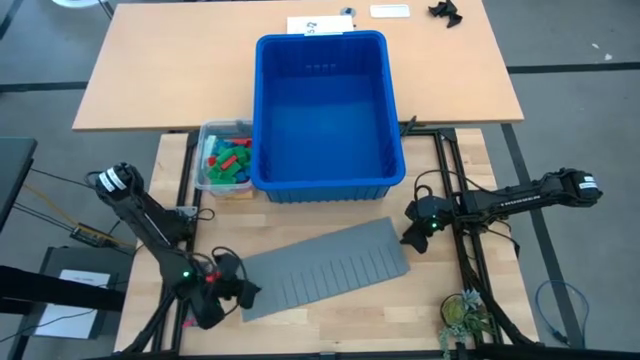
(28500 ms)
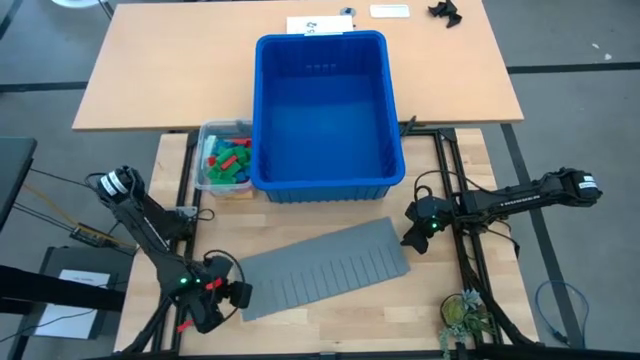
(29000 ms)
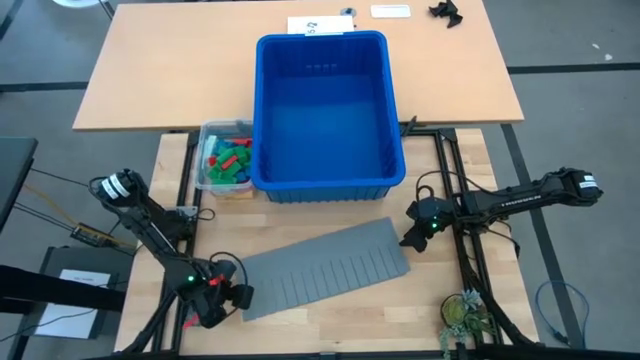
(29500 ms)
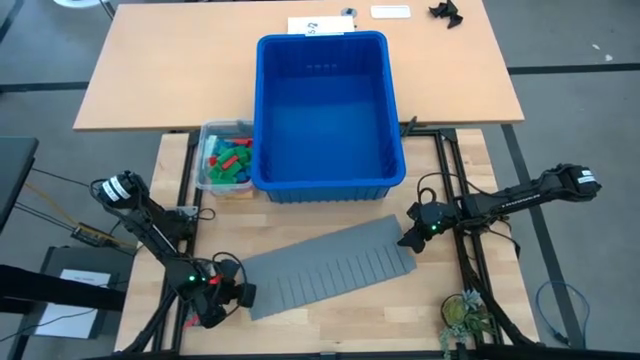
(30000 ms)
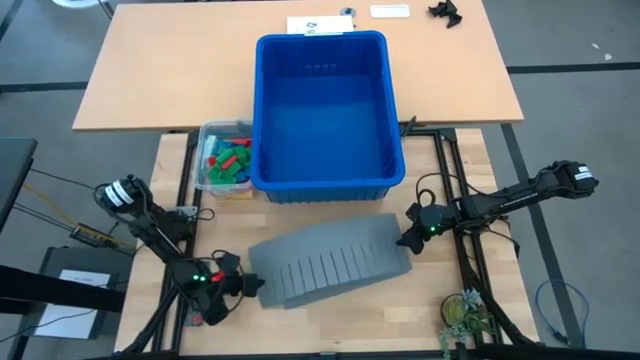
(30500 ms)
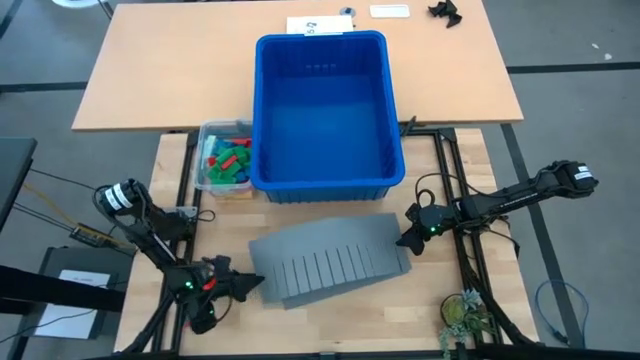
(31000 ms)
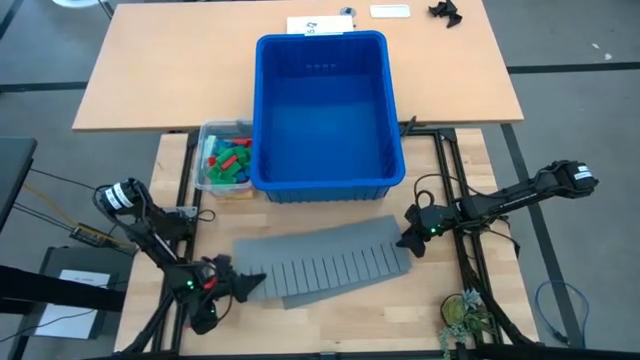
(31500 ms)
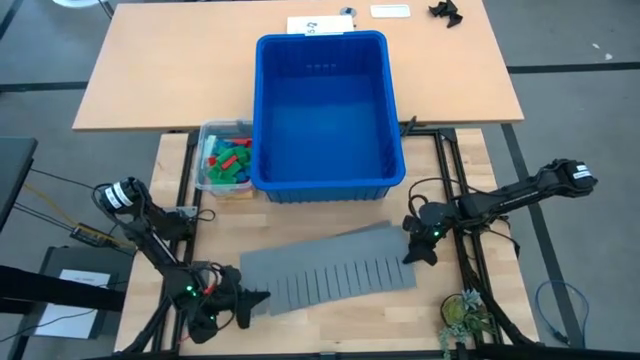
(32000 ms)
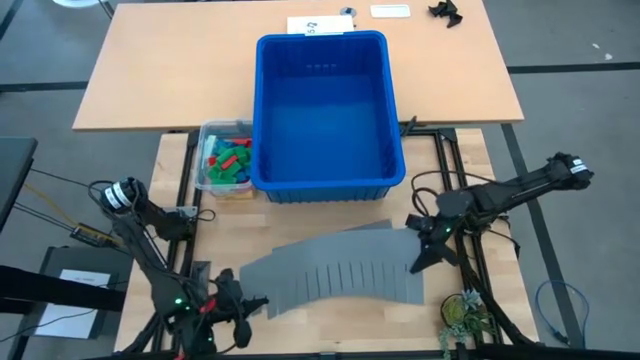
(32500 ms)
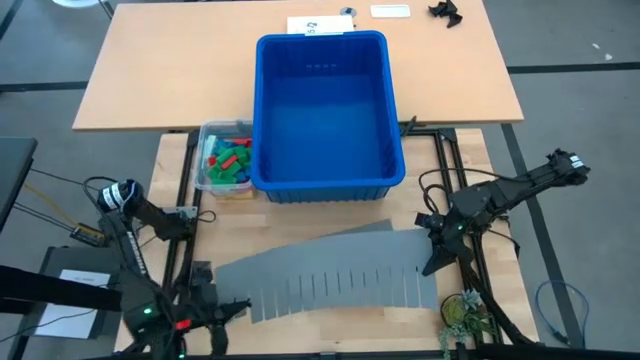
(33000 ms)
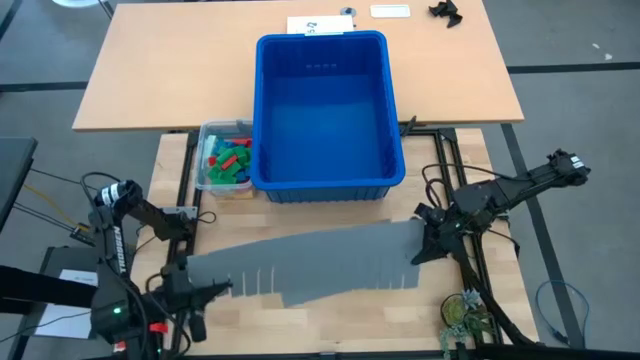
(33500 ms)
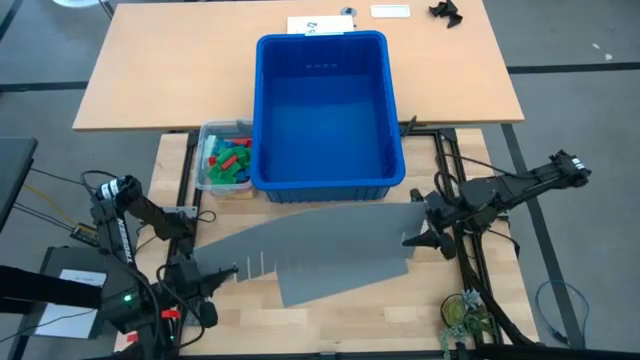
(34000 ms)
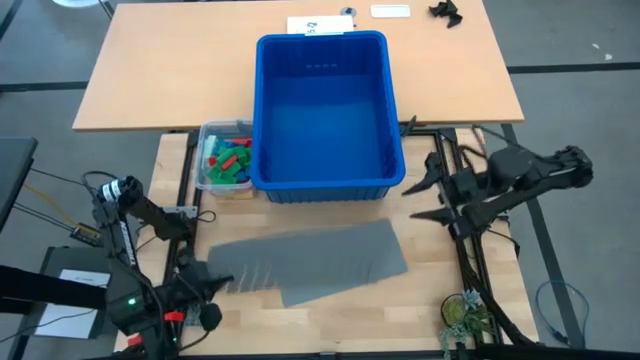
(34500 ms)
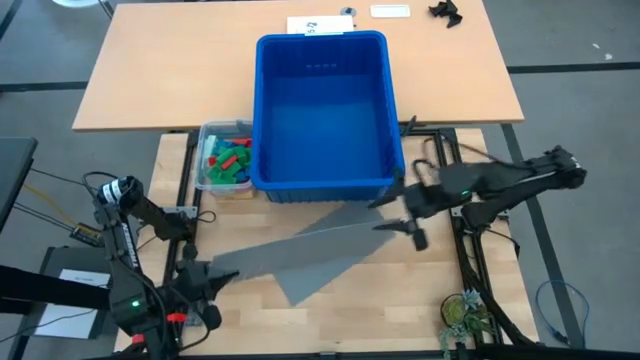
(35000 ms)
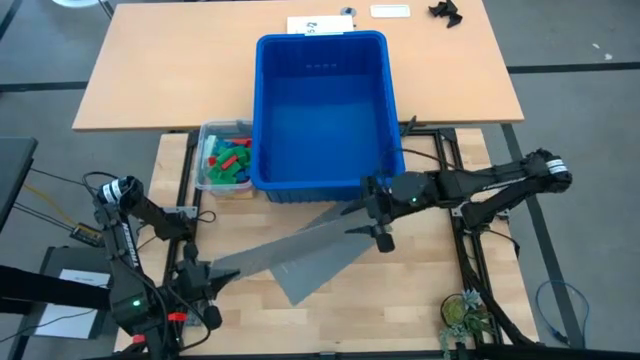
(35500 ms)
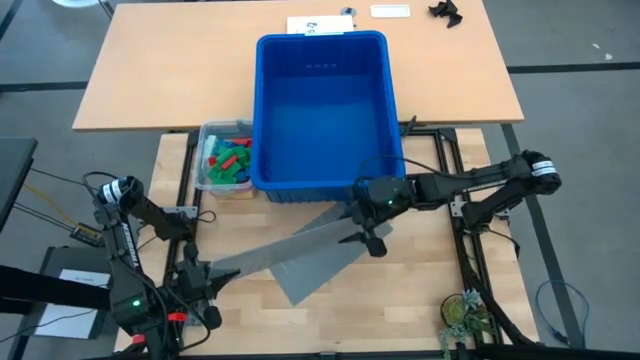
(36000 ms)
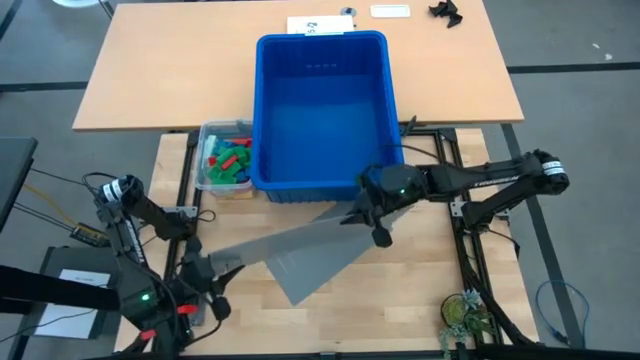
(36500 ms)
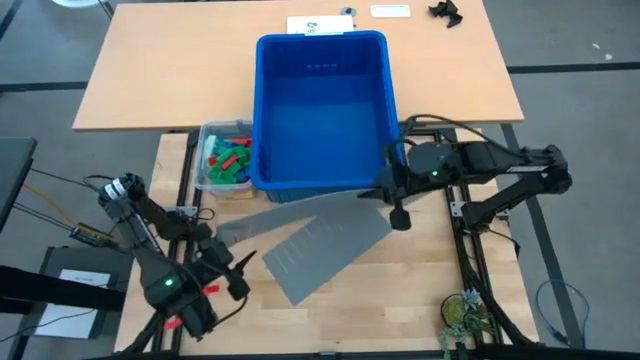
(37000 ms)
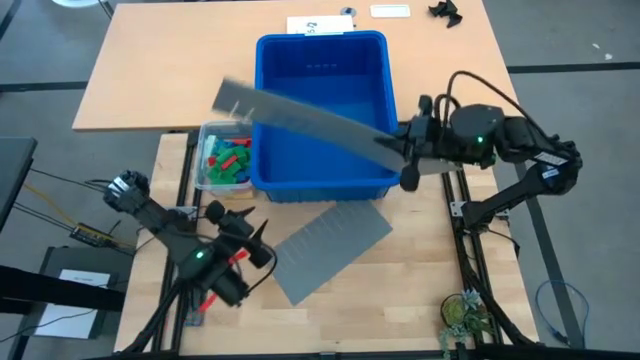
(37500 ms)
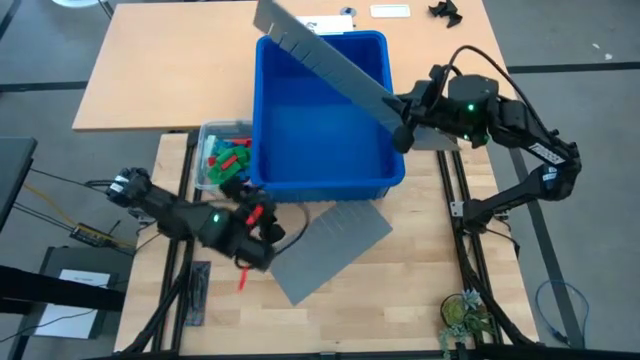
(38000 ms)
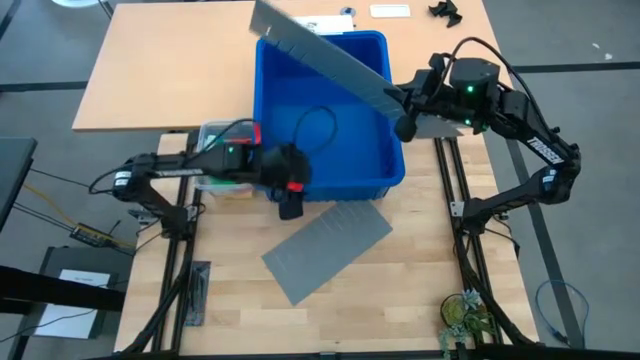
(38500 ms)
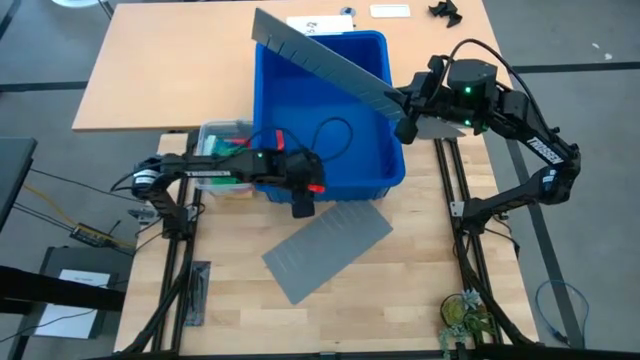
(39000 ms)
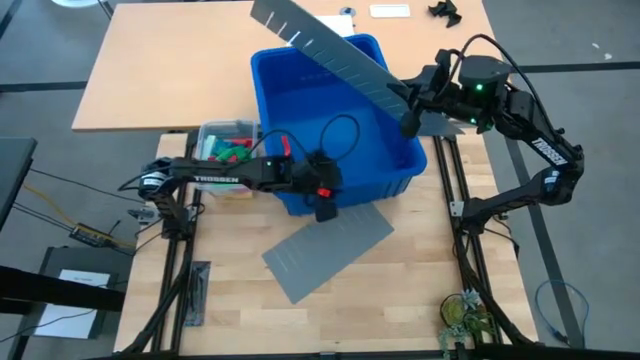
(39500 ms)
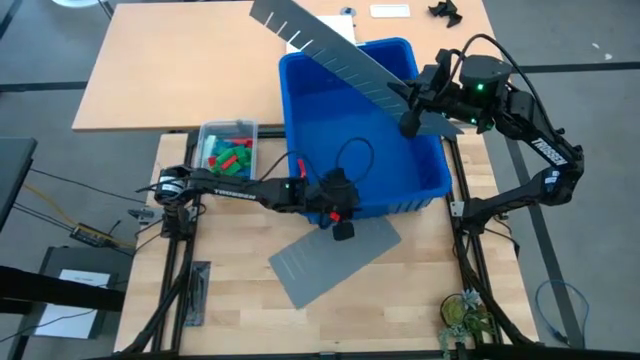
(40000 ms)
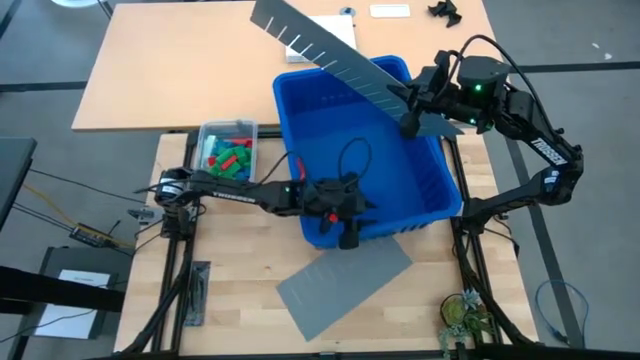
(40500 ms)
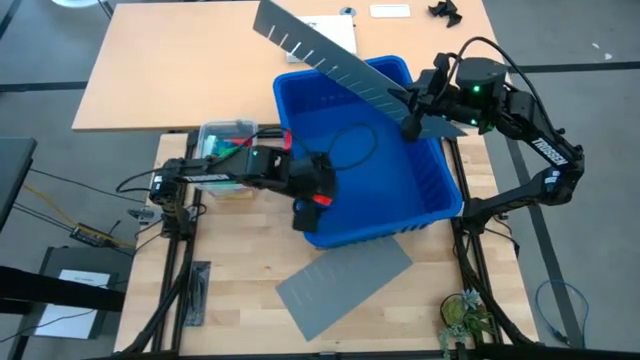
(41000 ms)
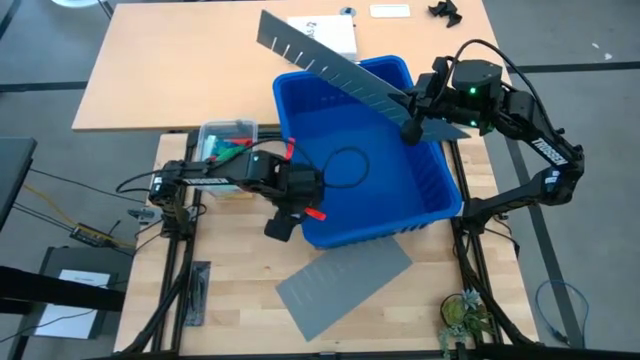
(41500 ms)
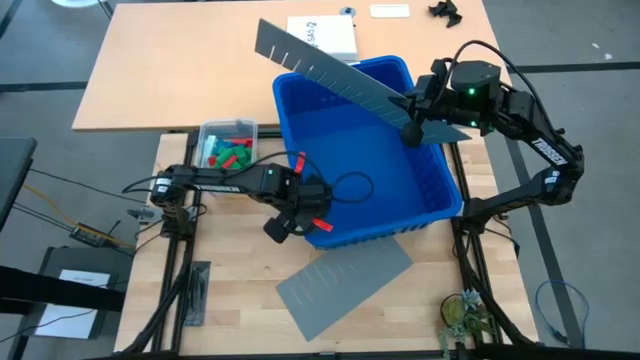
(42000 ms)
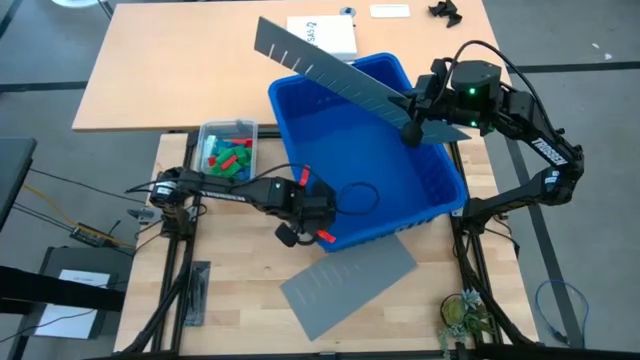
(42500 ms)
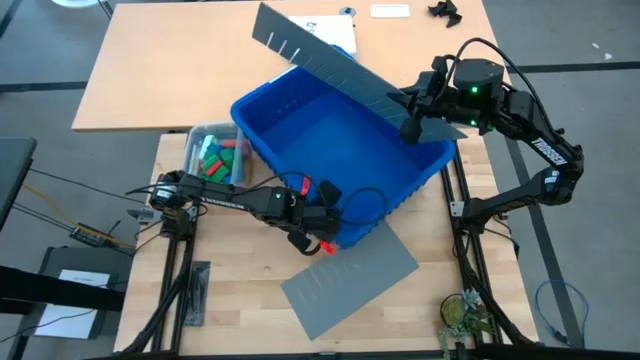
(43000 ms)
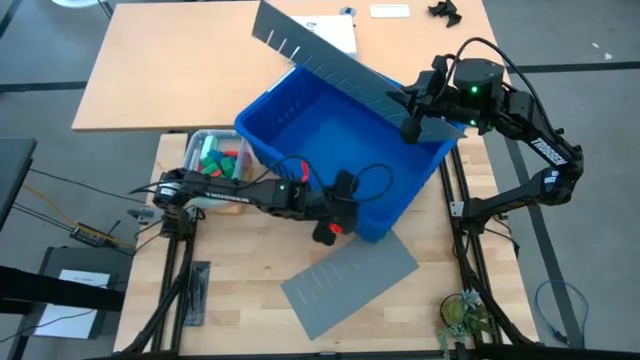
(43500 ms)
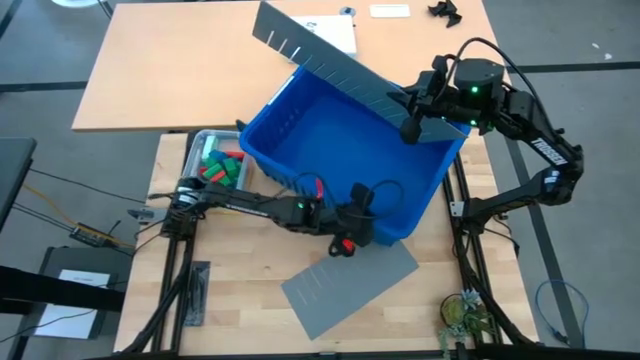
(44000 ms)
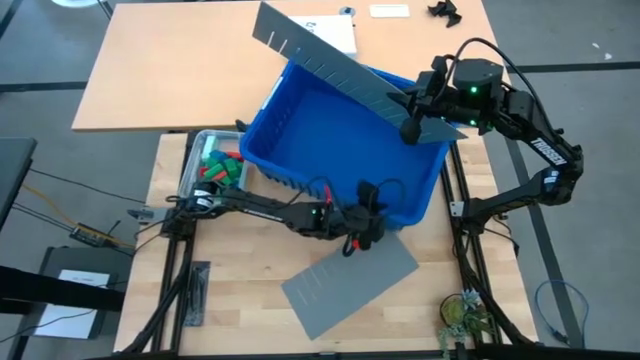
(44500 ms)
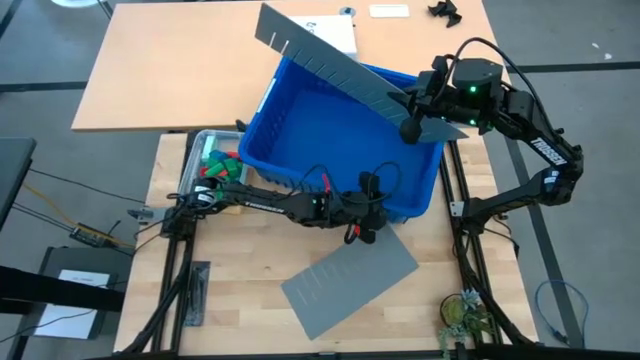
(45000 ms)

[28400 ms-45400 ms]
Task: Sort blocks
Assemble the blue bin using bin divider
